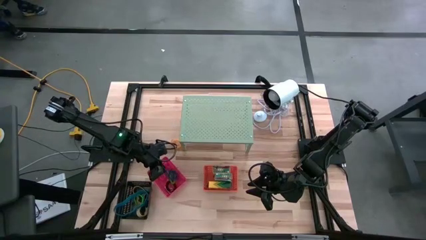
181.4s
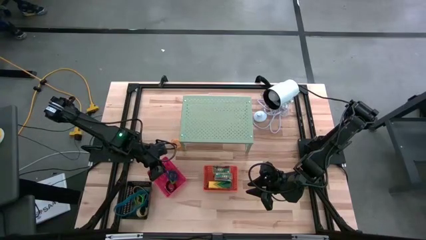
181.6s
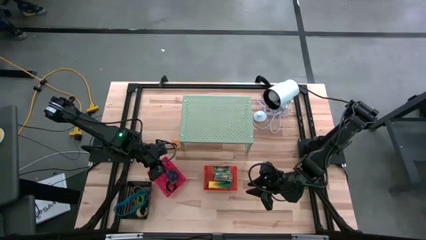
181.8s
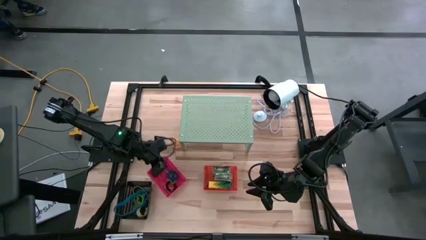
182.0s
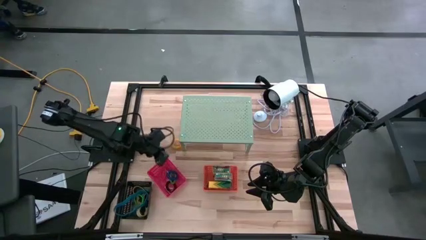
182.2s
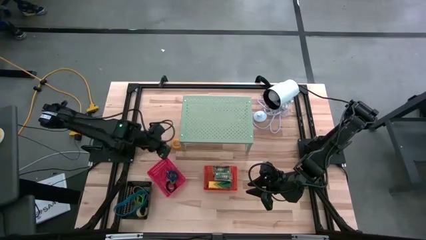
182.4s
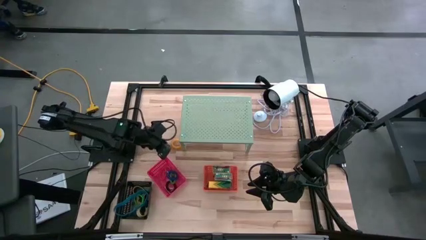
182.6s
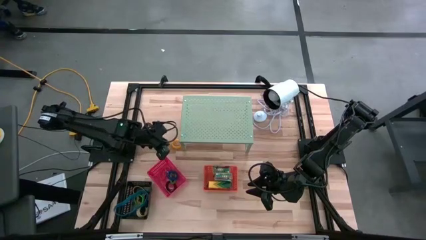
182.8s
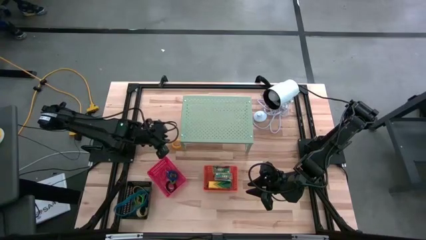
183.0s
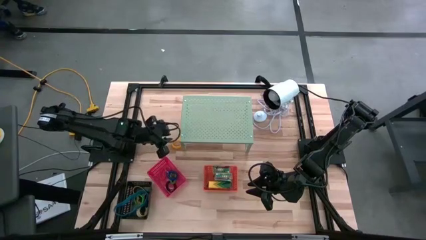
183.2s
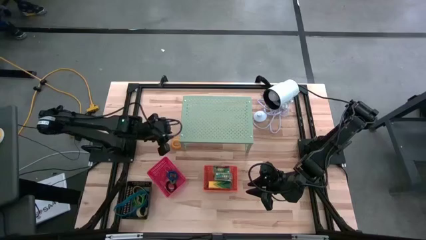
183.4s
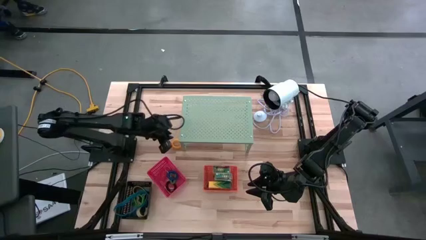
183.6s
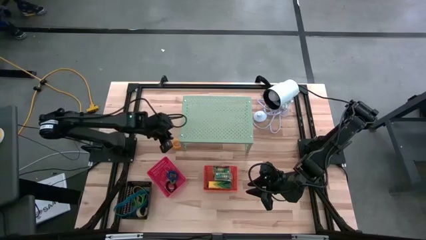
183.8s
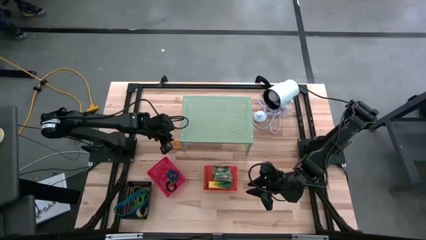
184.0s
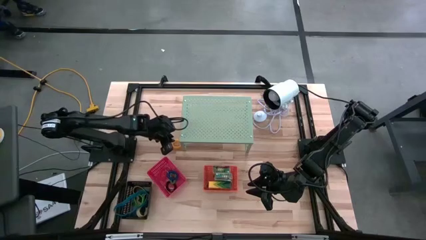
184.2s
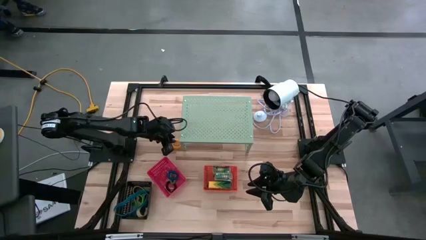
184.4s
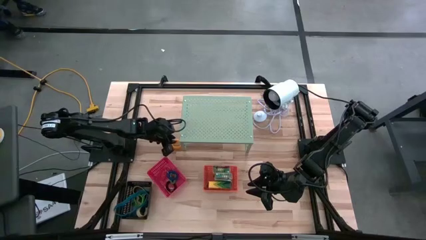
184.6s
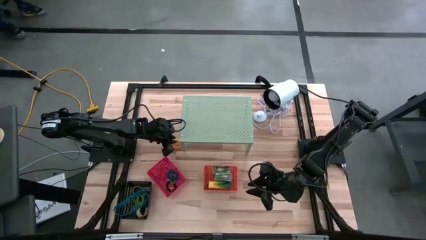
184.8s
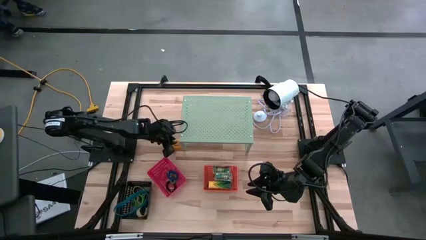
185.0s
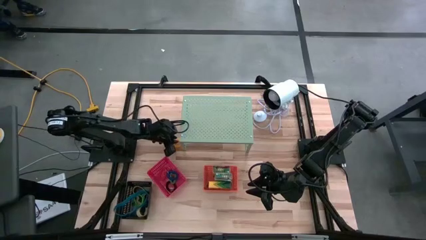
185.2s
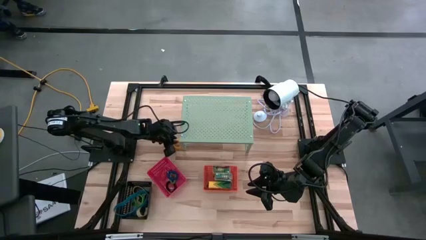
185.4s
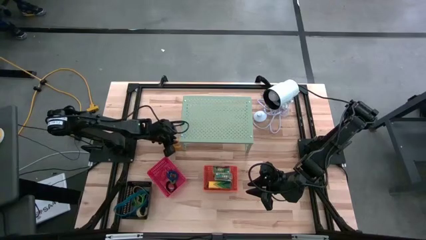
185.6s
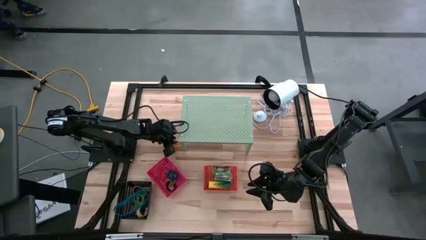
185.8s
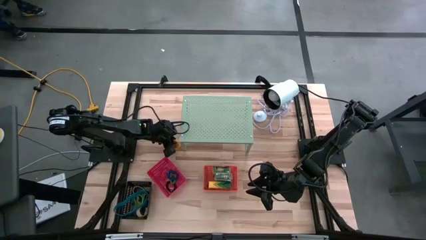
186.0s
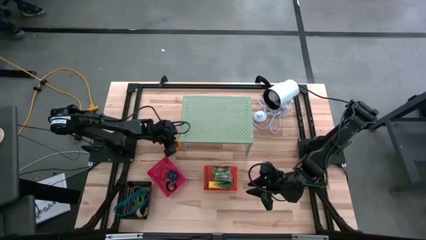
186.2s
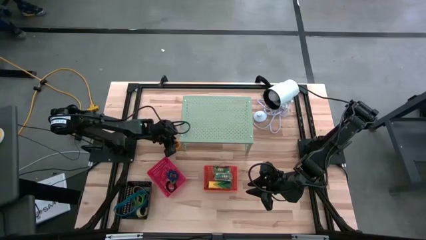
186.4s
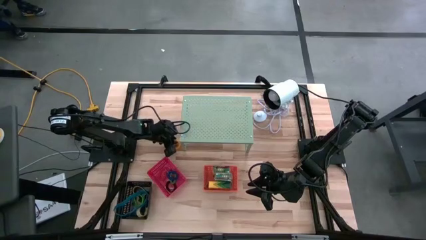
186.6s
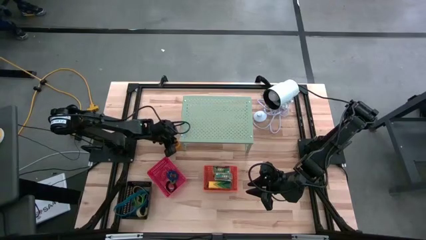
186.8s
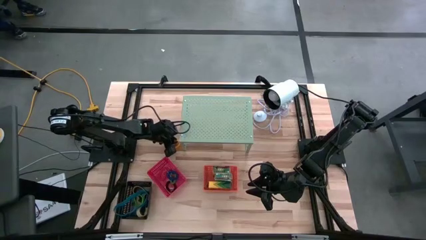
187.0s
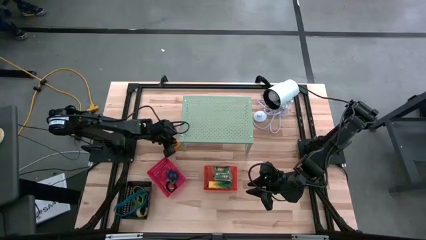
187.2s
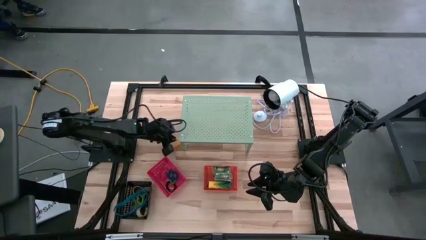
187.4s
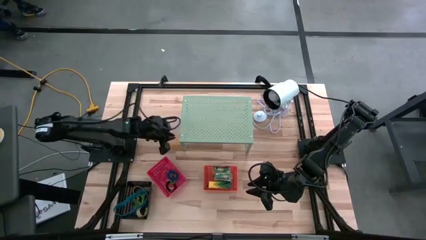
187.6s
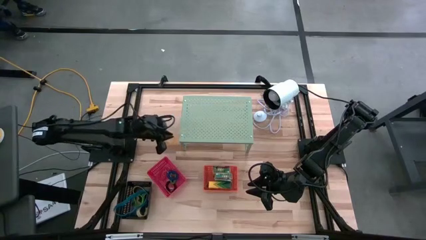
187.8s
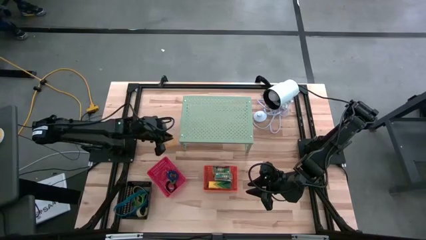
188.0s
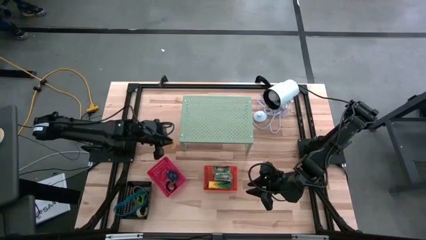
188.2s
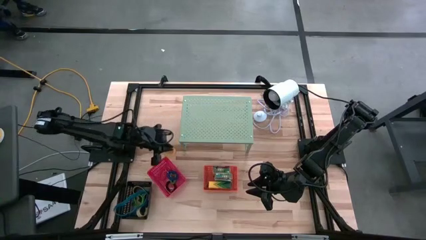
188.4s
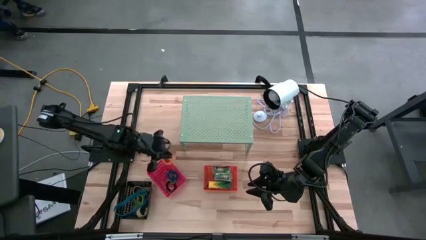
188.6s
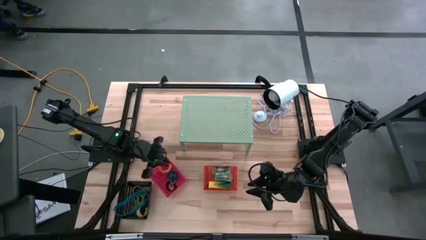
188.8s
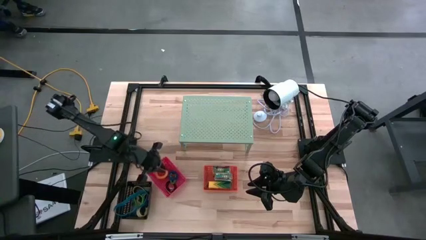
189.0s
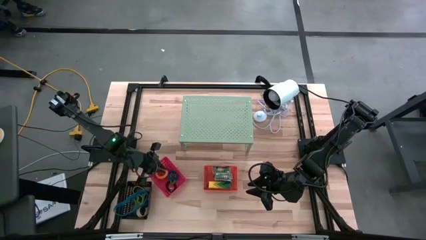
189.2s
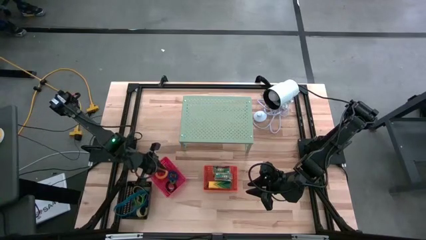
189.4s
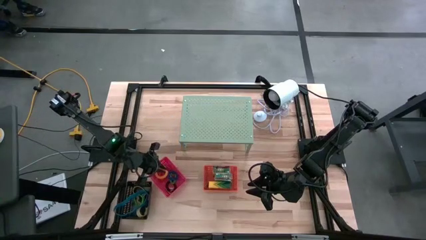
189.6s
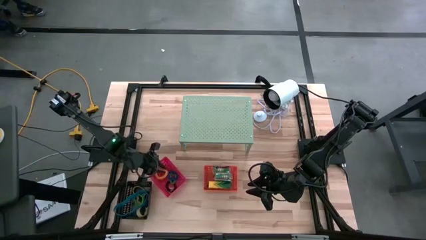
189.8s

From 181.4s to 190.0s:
Task: Pick & Place Office Desk Supplies
Put the yellow spring keychain into the red bin

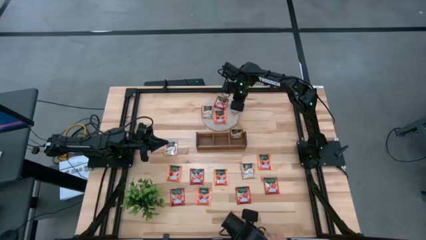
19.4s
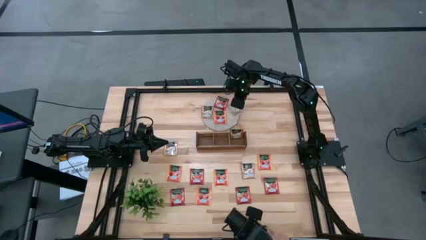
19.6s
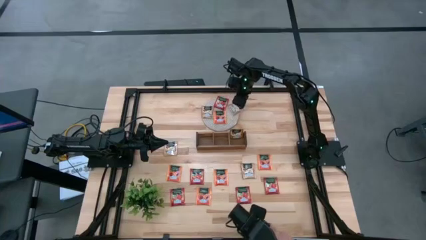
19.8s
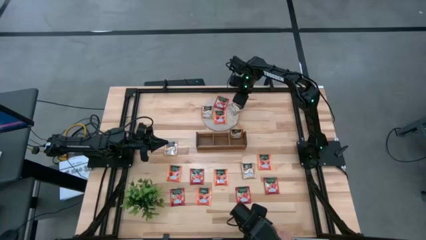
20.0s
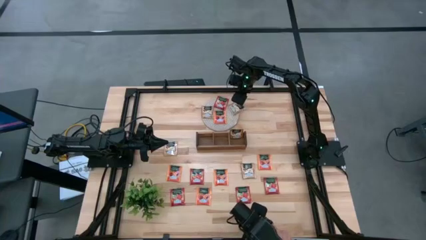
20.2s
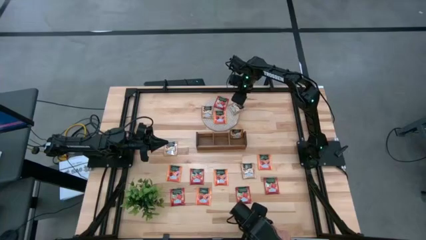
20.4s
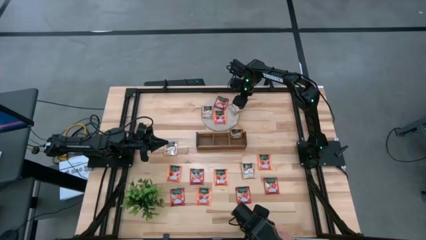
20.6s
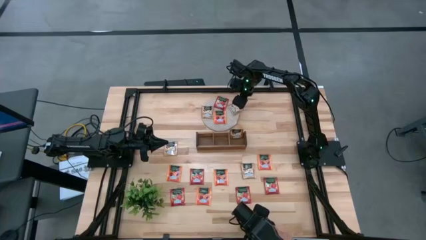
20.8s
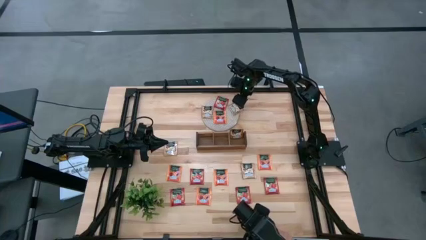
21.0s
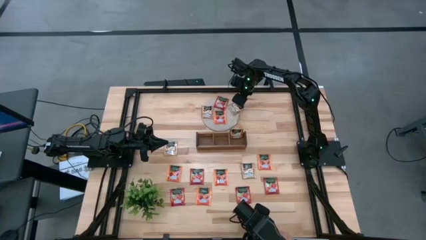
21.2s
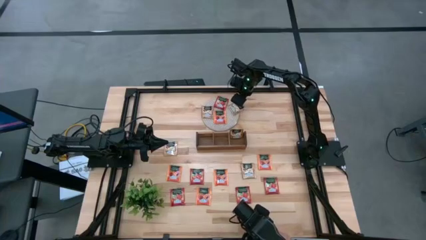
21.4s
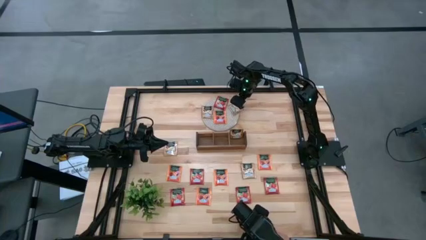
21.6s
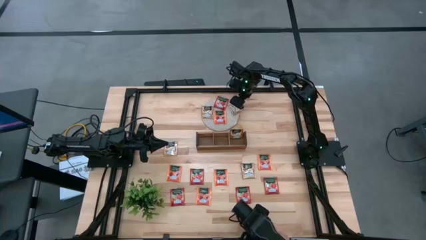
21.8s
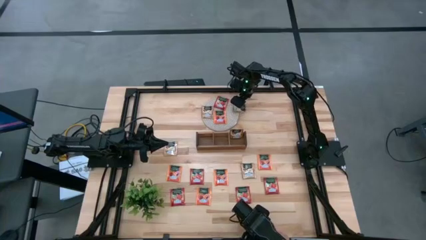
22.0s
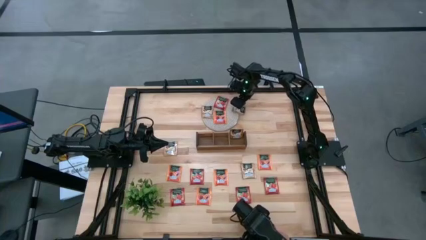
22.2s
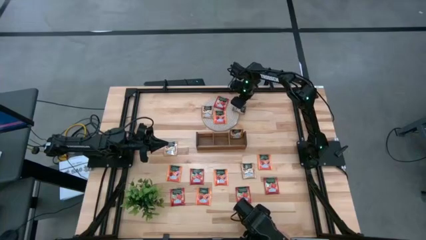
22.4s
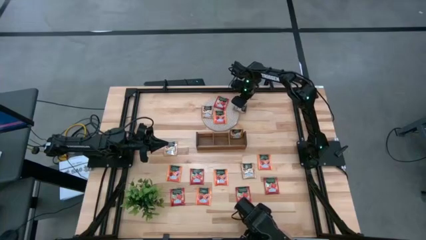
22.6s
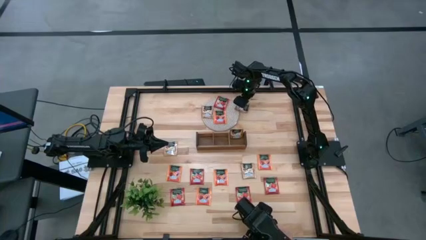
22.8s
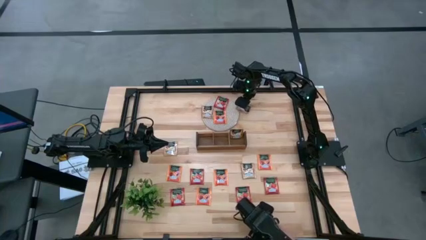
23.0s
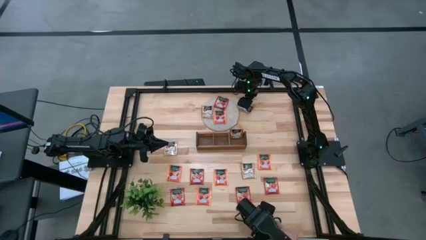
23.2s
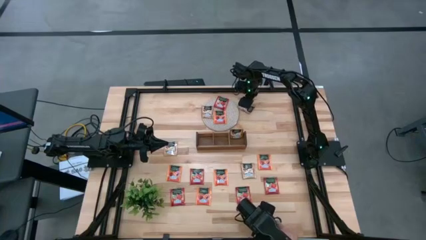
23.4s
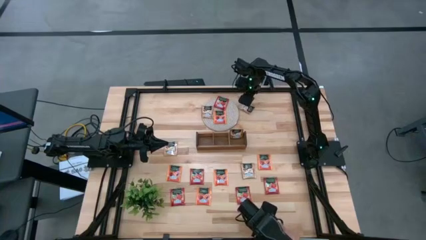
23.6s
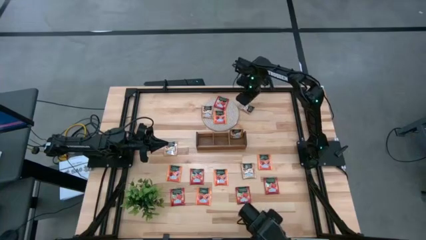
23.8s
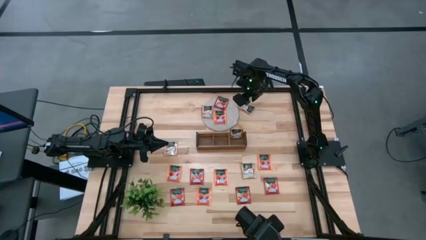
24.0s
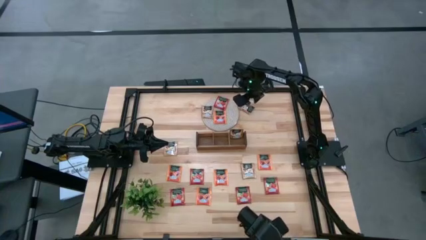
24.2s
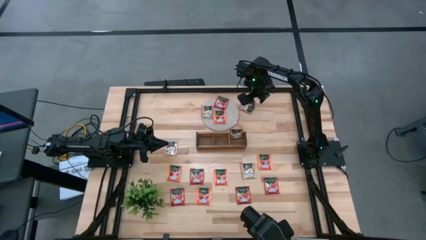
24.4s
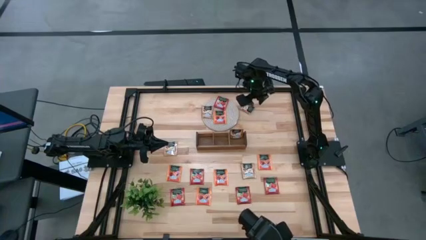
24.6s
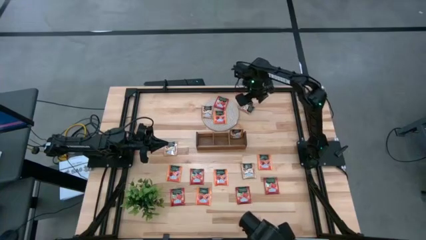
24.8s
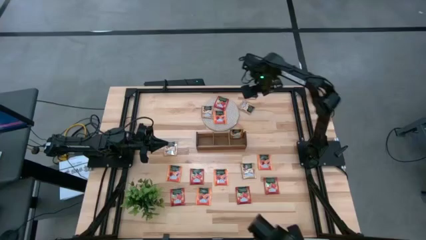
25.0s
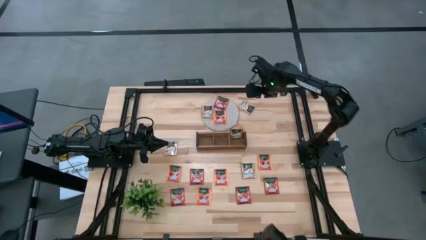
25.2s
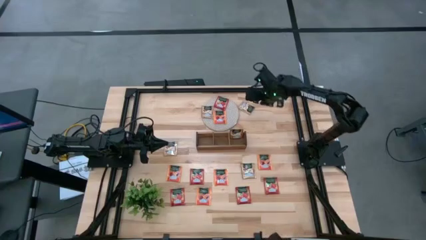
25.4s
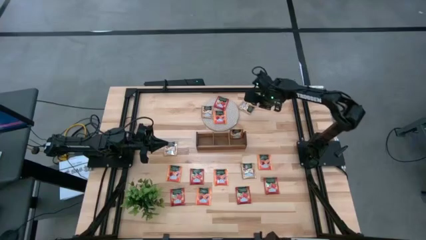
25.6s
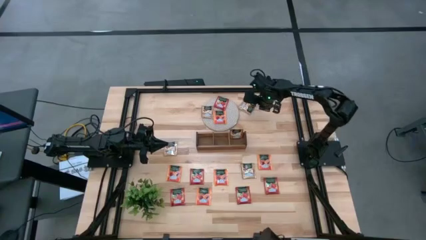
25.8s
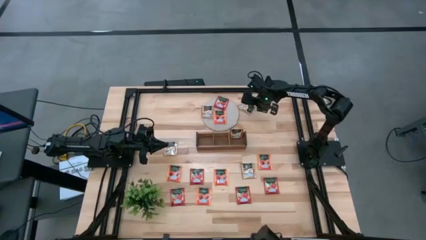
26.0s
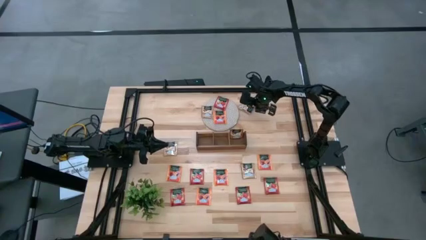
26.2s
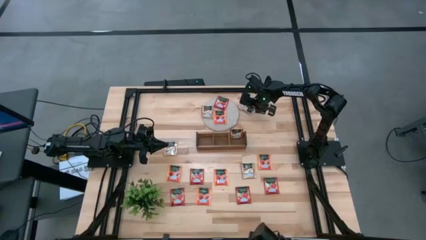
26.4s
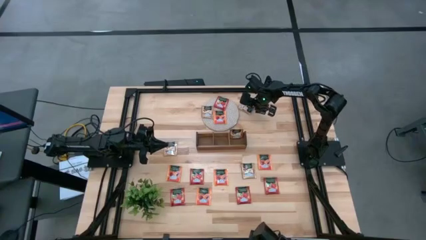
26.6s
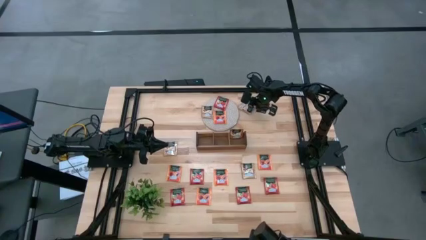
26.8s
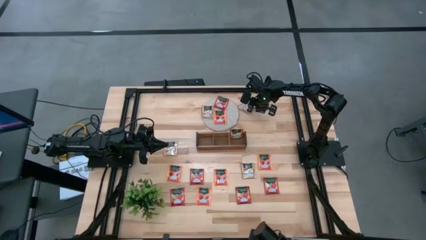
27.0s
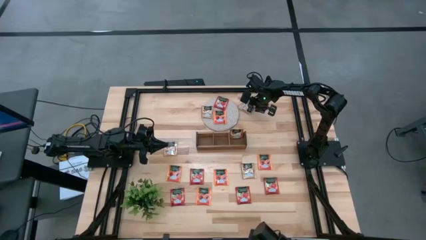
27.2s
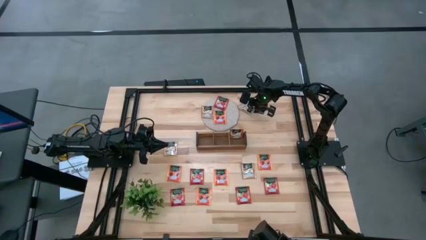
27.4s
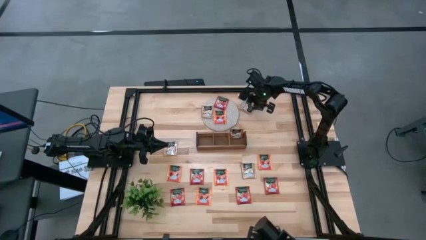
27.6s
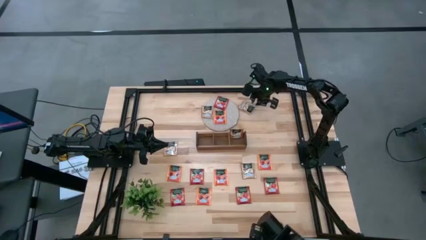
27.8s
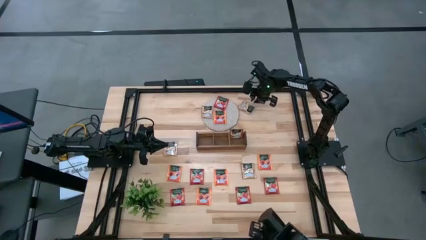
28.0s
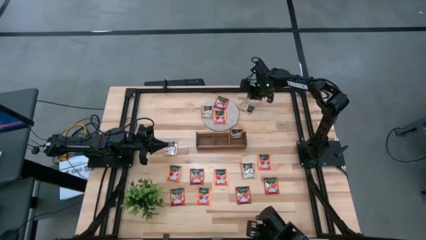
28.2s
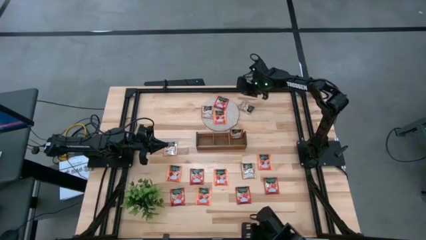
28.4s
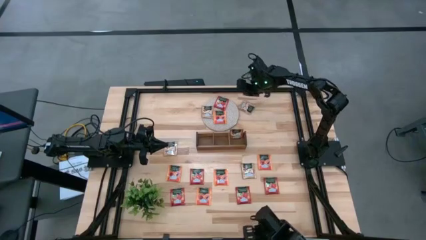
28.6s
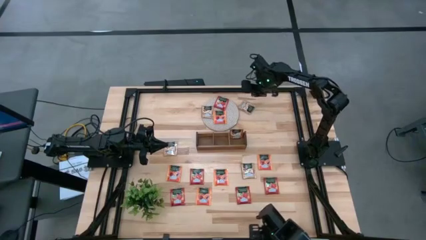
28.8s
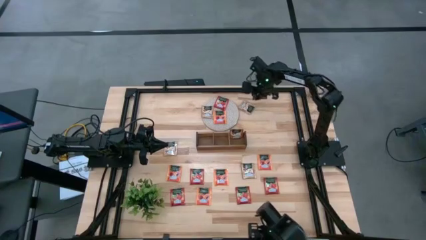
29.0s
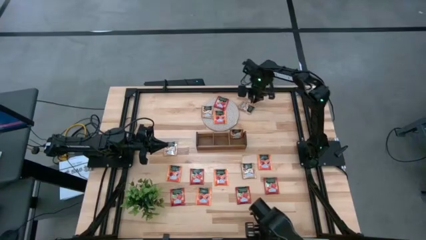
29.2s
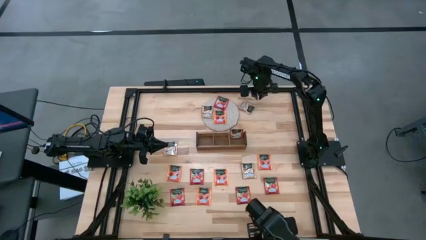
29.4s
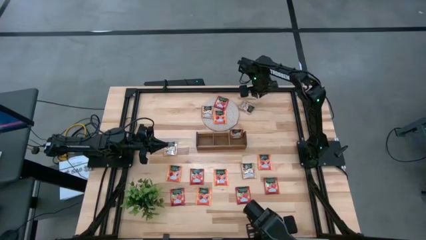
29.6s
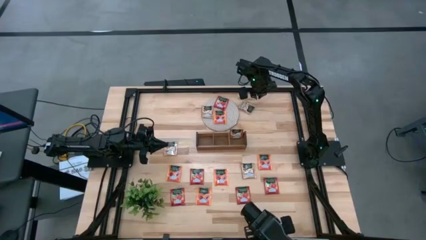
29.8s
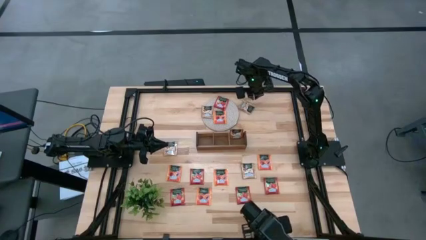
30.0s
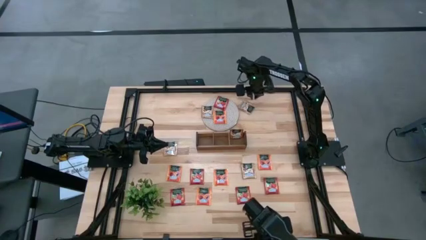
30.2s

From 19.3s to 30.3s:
Task: Pick & Place Tea
Put the brown tea bag into the right section of the wooden organizer
